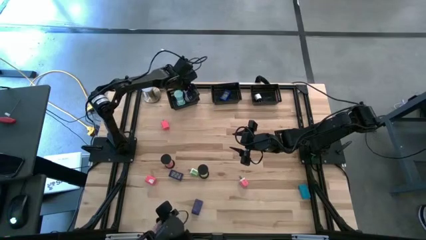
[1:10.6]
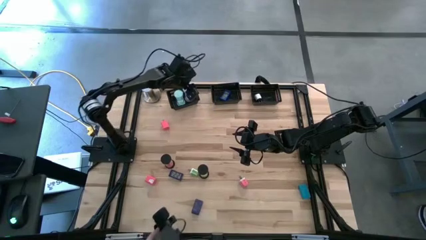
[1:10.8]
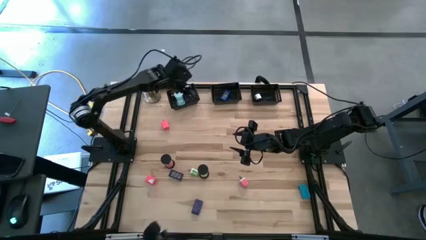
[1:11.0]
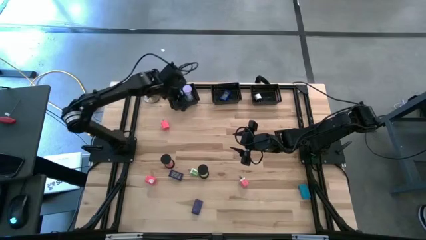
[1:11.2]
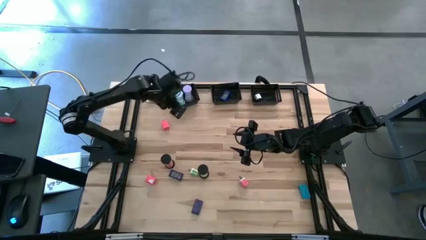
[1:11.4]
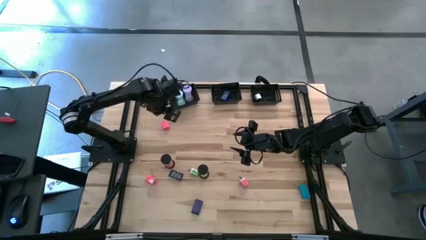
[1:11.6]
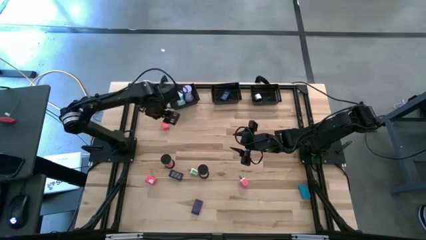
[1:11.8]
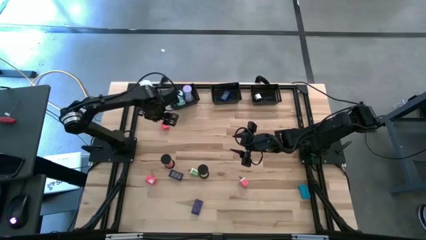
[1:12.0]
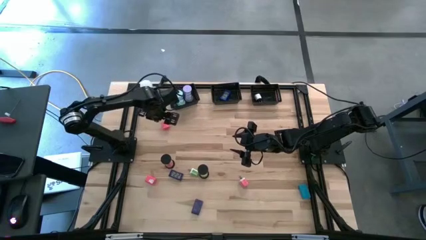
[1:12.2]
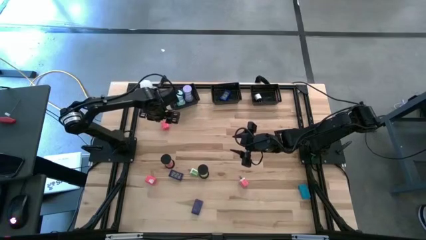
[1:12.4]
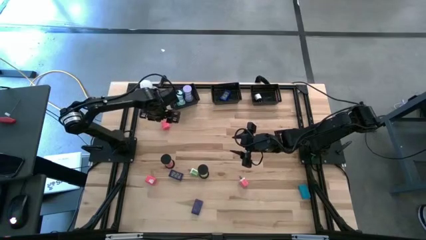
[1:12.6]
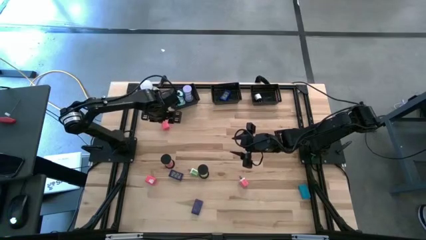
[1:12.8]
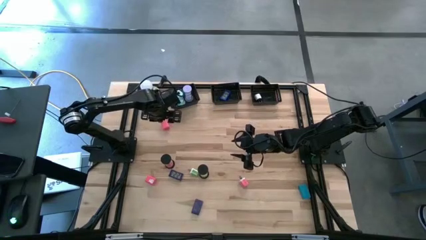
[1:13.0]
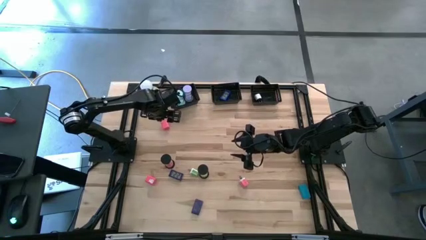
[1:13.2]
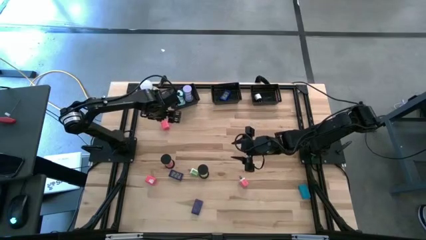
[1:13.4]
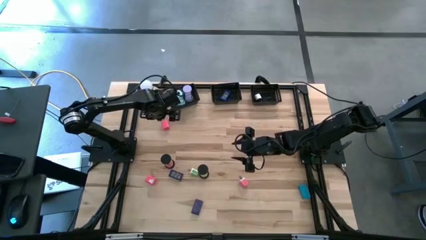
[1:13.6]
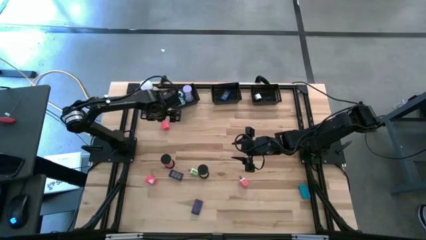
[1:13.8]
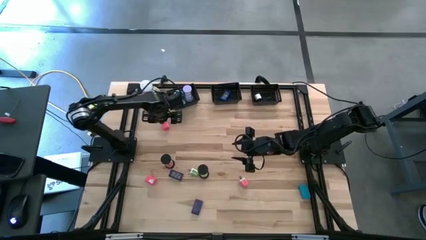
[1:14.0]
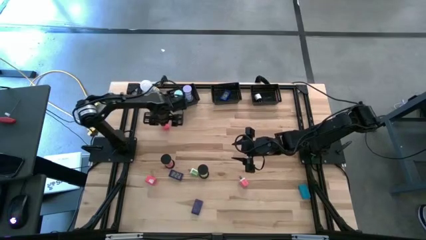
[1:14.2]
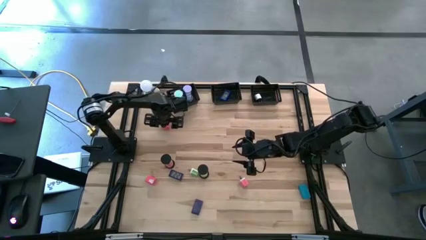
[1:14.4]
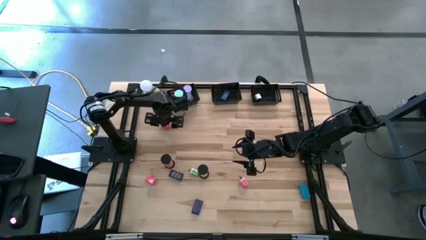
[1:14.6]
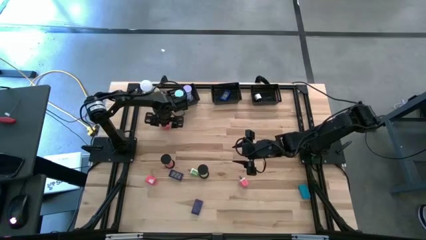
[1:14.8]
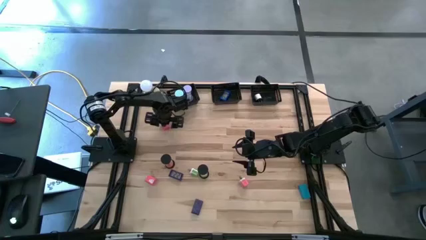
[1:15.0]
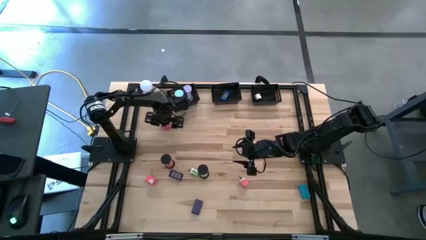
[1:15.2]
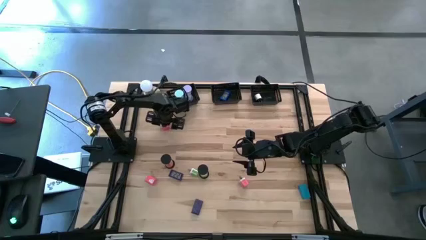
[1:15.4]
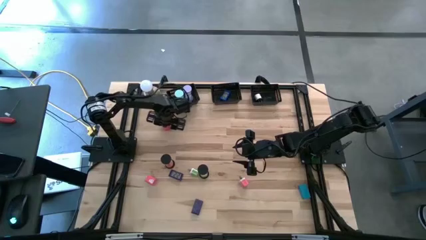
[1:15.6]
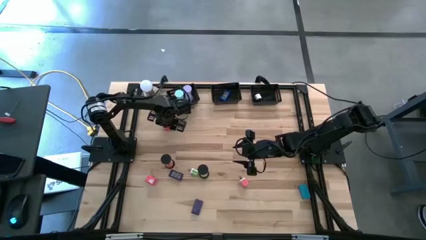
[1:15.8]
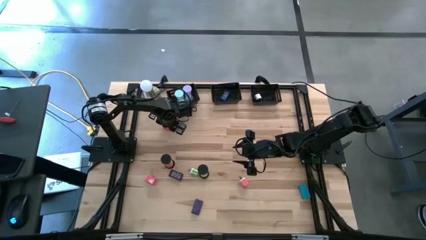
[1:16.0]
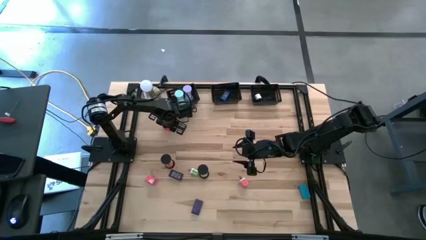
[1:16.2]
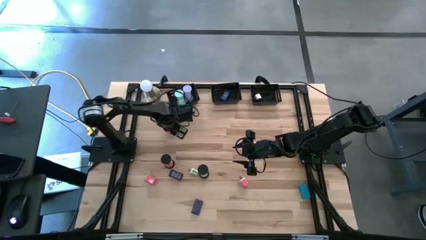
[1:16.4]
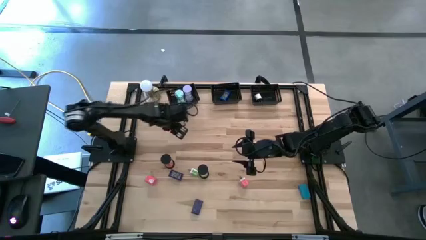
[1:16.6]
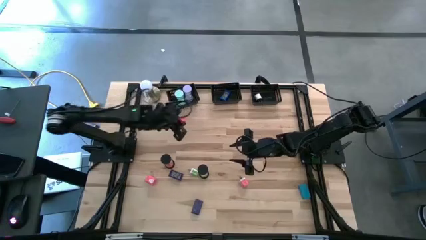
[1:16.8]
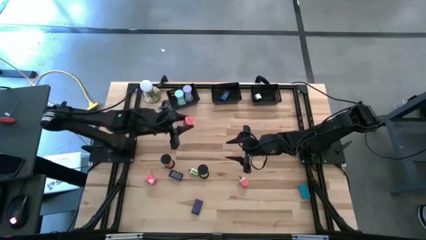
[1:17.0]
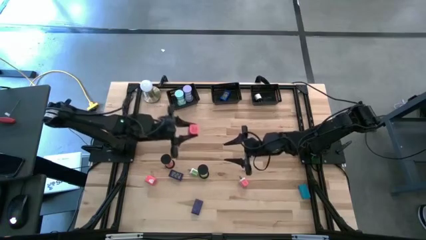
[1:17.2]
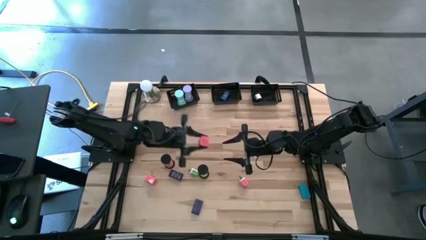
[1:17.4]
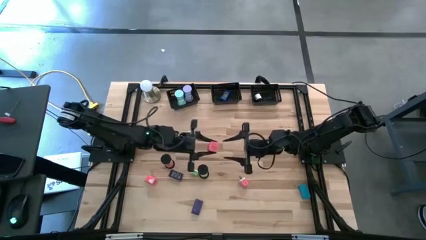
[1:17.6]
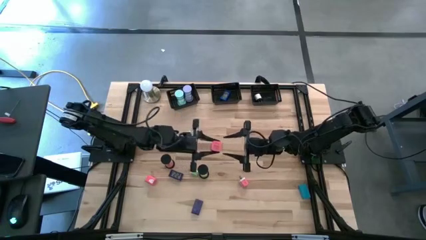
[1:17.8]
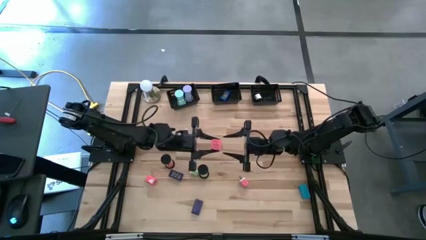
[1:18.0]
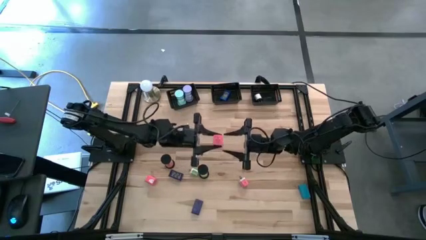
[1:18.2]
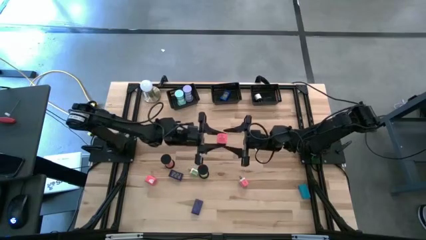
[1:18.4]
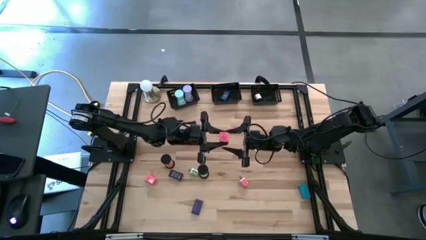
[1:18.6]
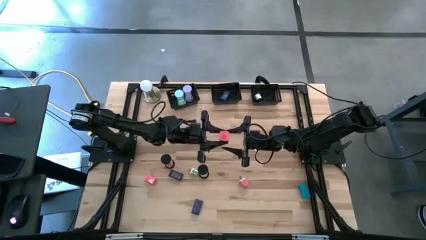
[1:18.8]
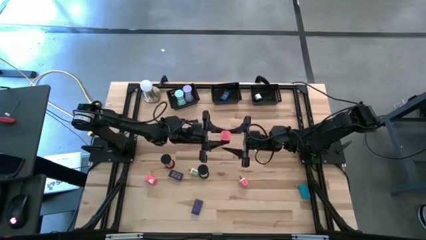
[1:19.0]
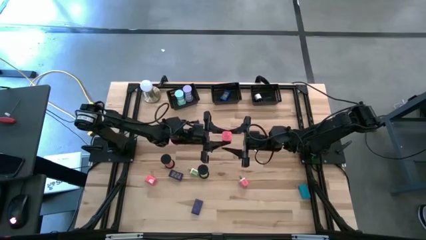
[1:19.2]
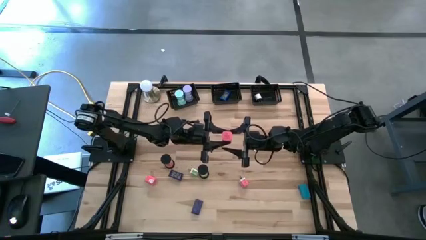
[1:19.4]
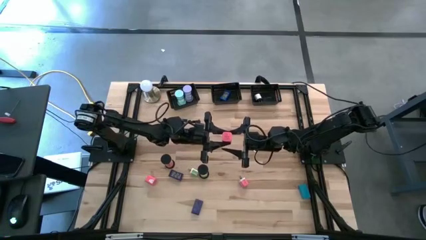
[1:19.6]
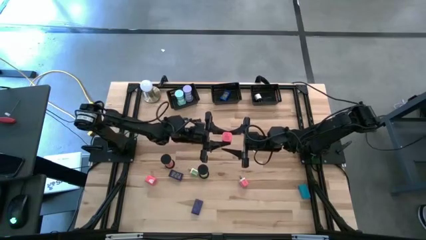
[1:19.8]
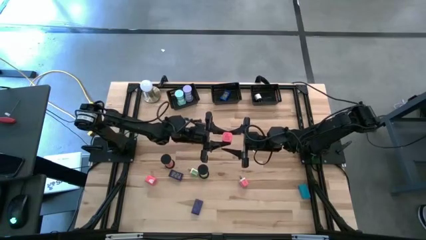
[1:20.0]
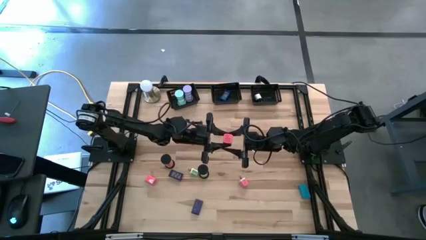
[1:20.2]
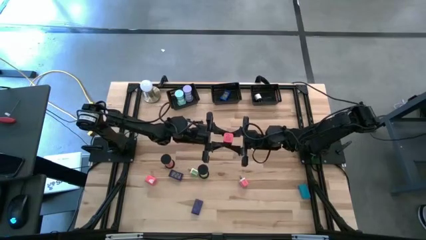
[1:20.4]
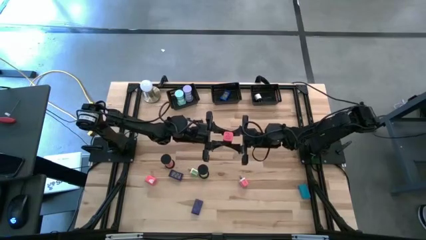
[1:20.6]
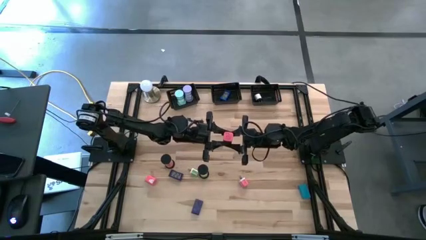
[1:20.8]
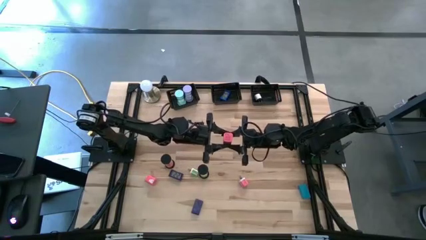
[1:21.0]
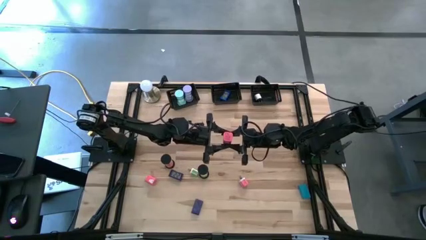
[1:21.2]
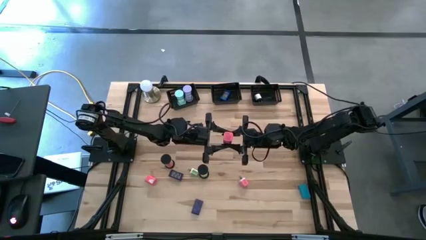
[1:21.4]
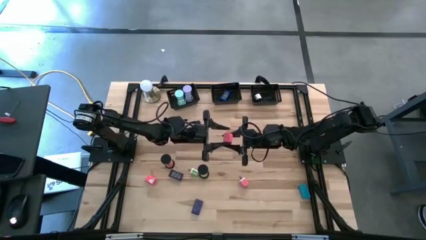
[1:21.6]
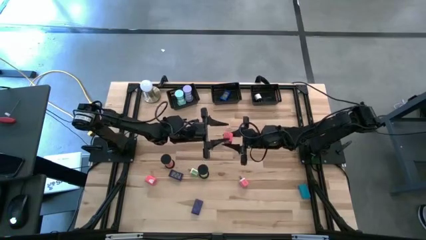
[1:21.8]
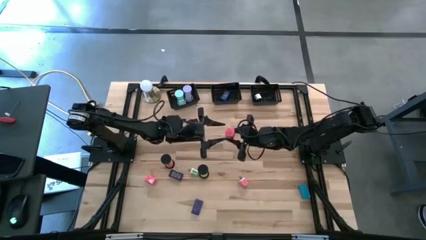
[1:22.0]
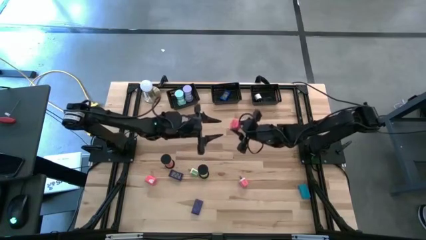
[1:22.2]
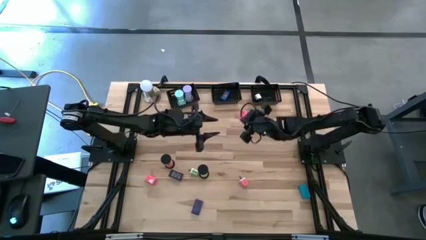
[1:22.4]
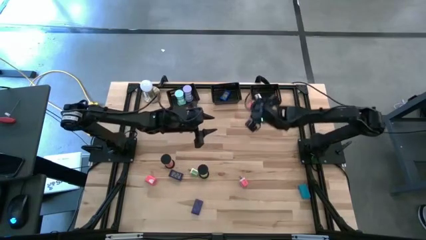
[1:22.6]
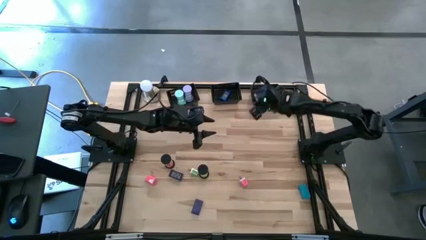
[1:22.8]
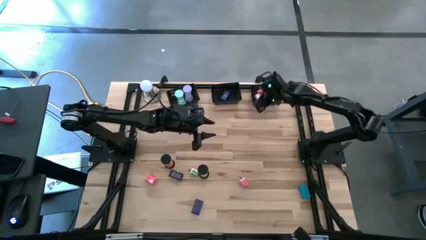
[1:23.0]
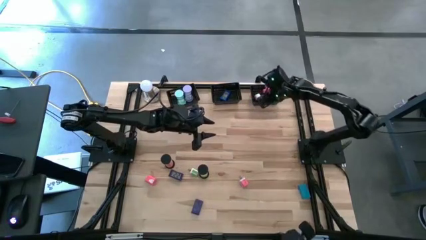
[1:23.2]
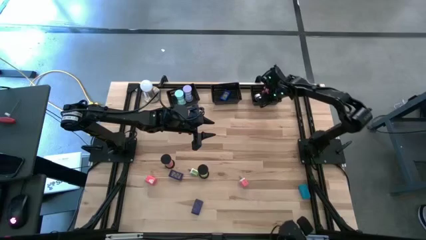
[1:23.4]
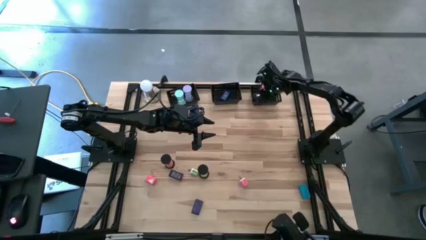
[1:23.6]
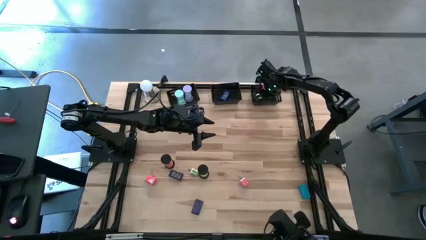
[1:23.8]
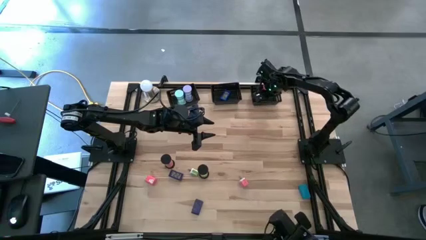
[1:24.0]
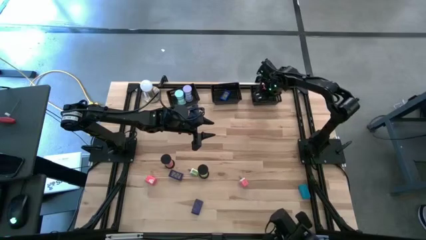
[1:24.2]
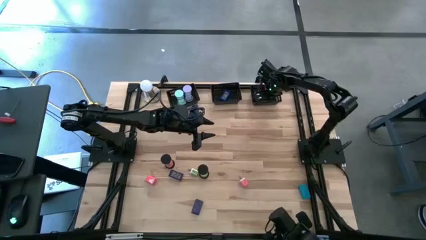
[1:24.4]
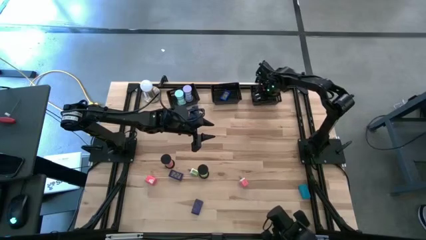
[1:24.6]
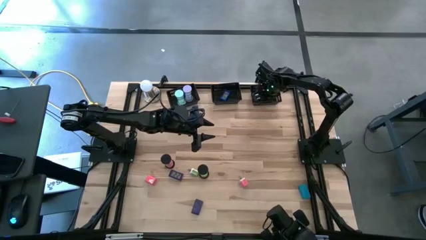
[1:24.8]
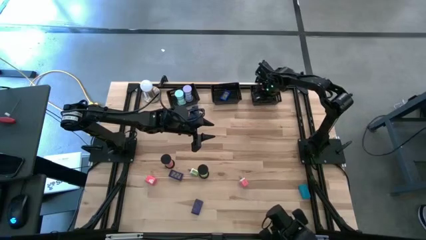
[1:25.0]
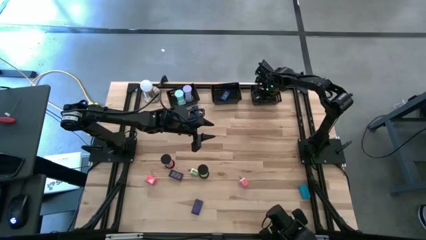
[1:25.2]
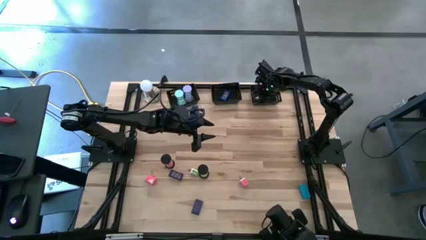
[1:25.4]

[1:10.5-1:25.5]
Task: Pick & Place Office items
Put the top pink charger adapter into the right black bin
